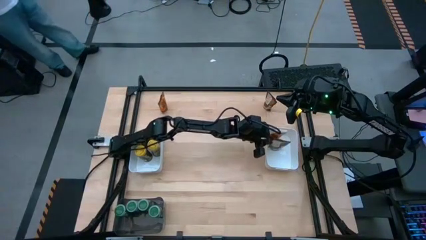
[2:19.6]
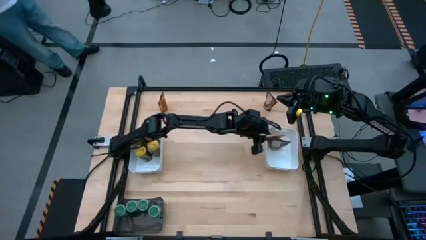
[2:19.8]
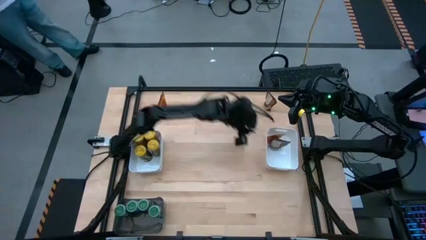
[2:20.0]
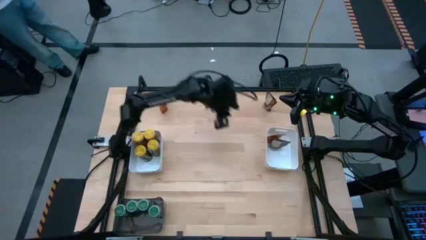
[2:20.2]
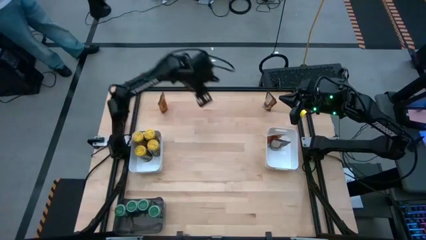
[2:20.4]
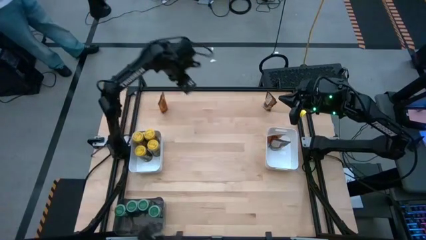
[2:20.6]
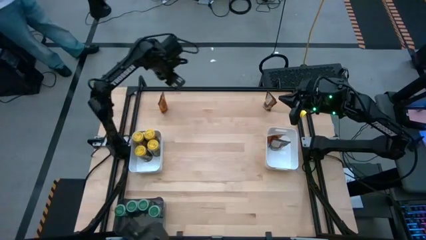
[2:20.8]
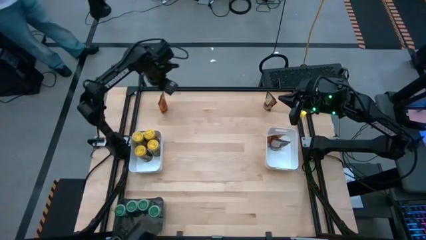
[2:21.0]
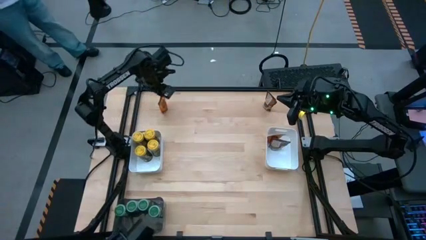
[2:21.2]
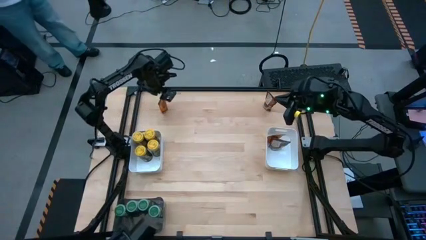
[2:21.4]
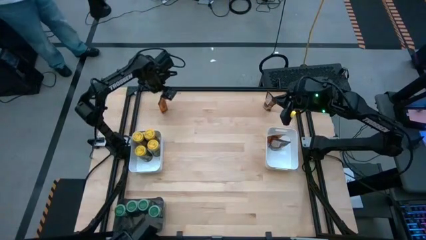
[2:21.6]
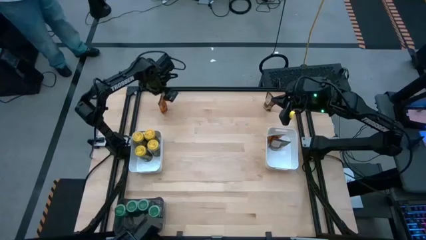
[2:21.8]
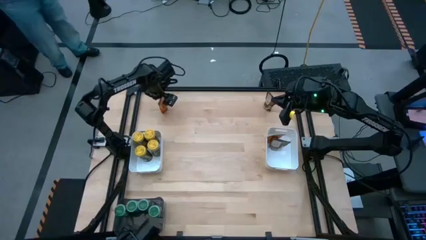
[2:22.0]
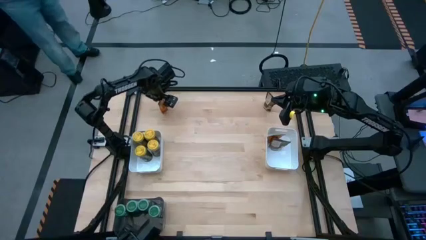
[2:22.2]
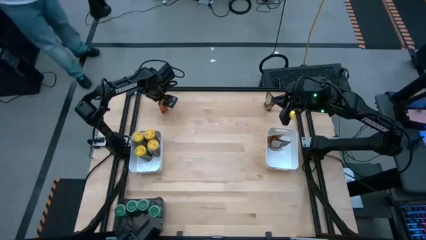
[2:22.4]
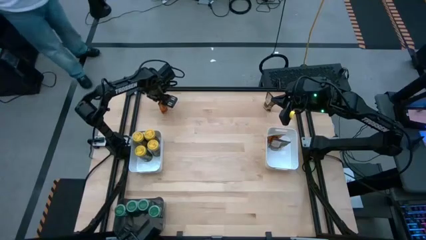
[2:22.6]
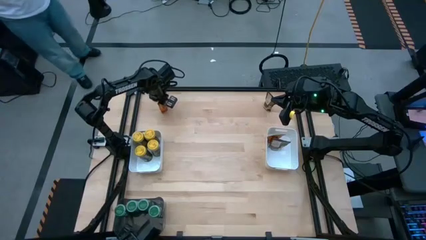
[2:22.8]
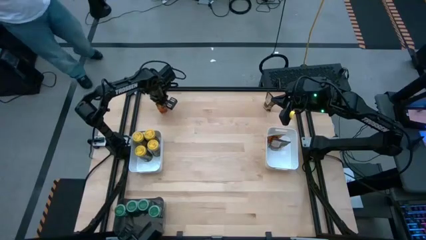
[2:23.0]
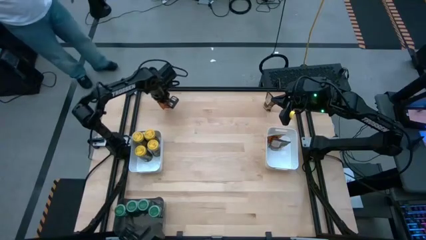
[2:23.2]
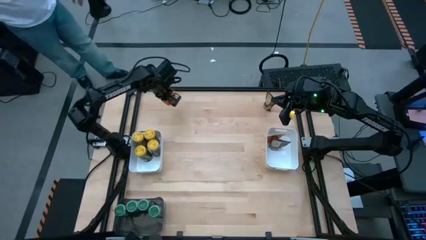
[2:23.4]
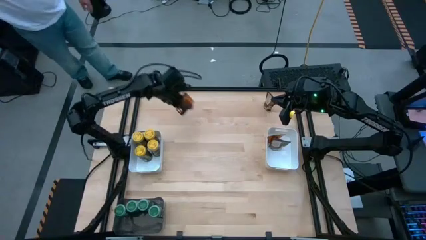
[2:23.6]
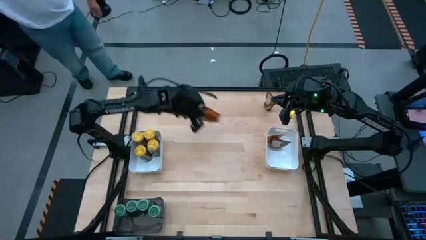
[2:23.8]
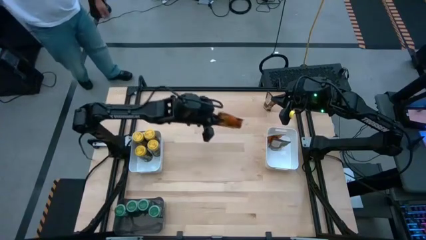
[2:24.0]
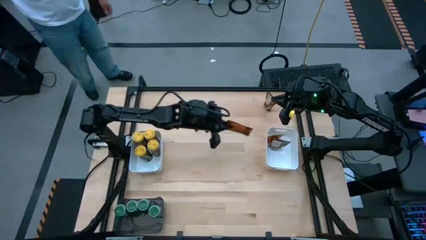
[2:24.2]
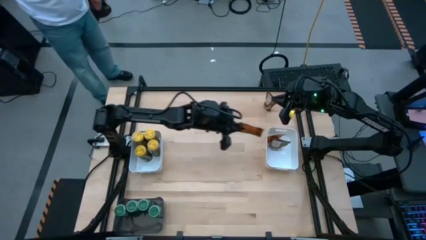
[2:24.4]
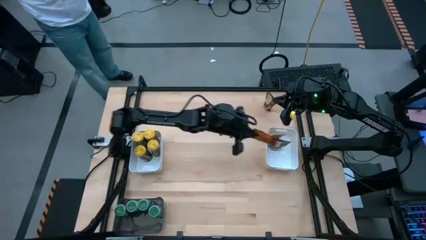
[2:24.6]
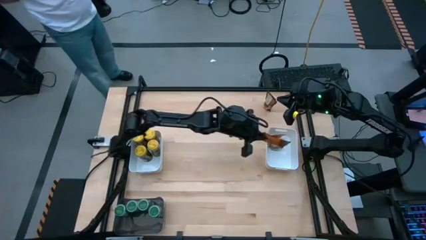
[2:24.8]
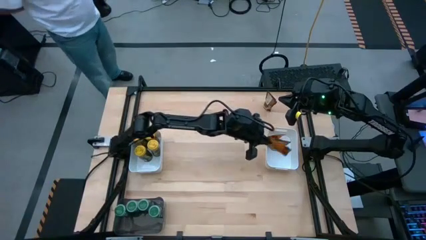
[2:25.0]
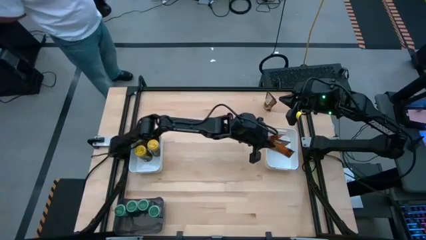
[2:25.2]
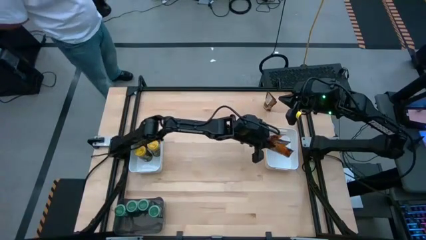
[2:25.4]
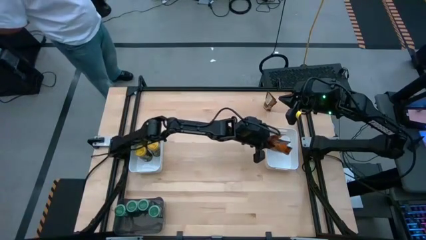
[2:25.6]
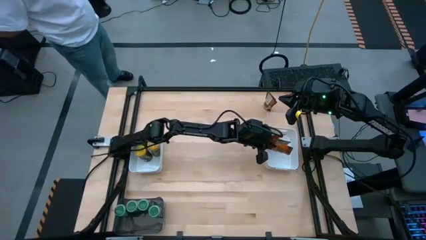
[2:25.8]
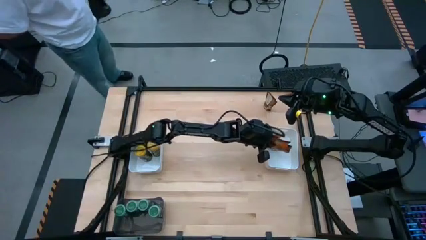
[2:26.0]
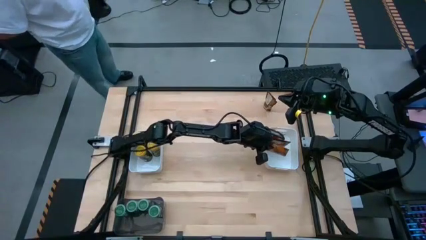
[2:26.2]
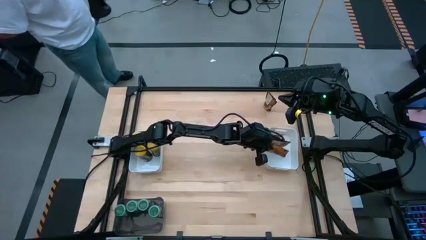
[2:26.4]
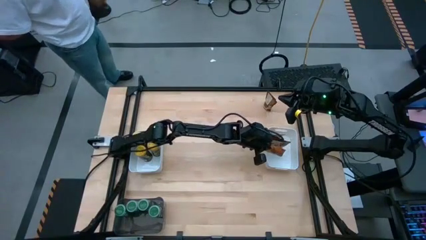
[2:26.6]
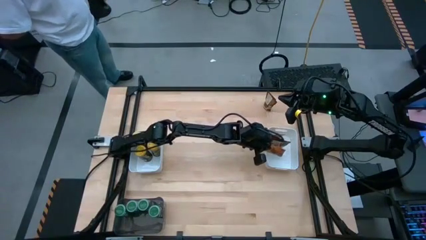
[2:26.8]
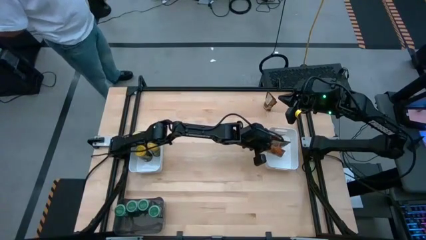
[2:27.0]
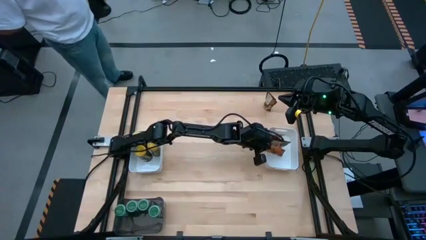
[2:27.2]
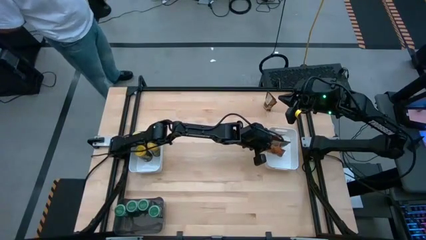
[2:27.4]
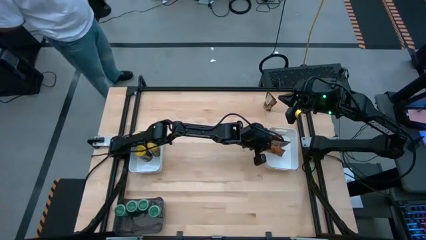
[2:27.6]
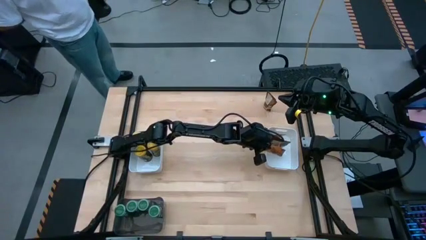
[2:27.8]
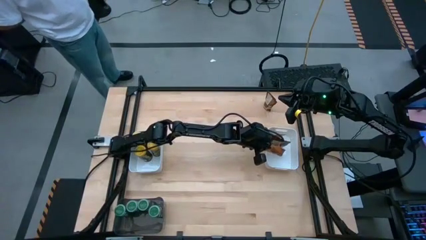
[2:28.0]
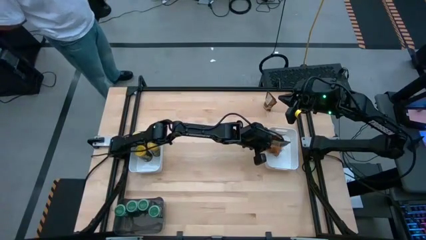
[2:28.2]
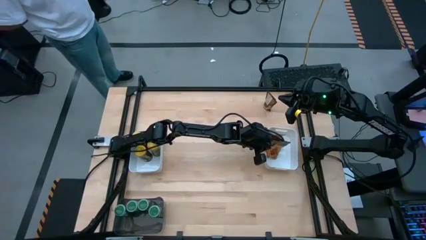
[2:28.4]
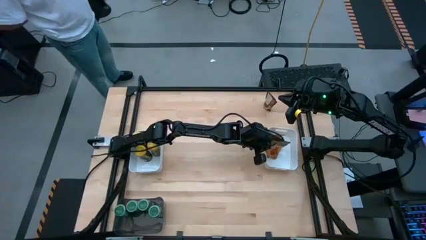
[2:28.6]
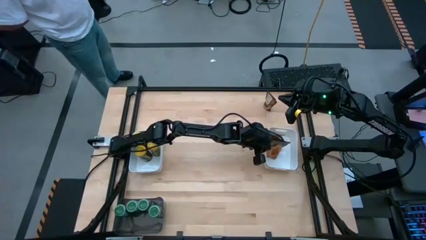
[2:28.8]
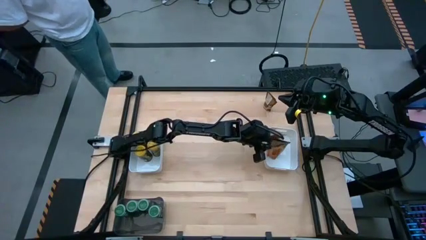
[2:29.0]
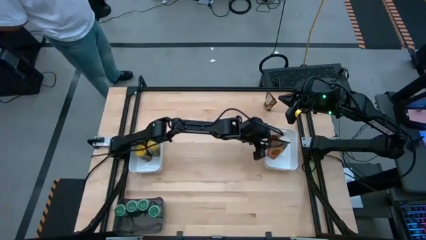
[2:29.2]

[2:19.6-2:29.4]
Task: Sort spices by type
Put the left orange seasoning bag into the right white bin

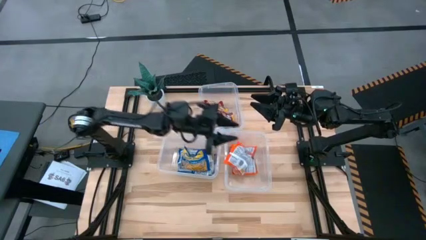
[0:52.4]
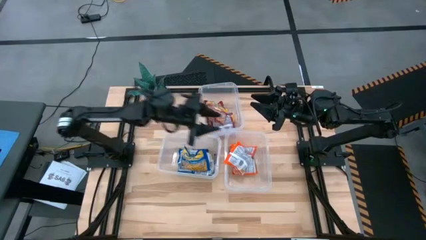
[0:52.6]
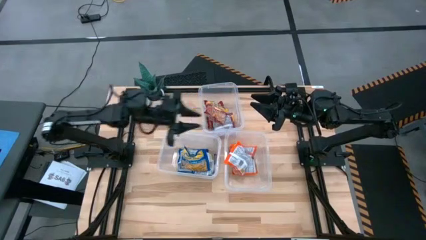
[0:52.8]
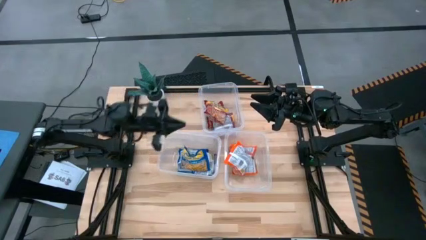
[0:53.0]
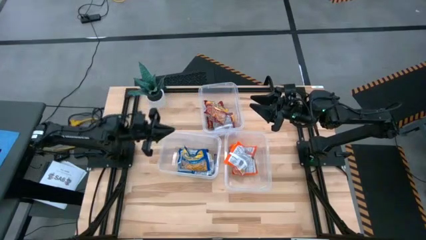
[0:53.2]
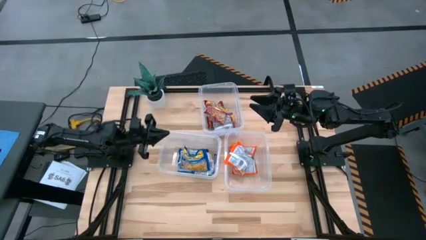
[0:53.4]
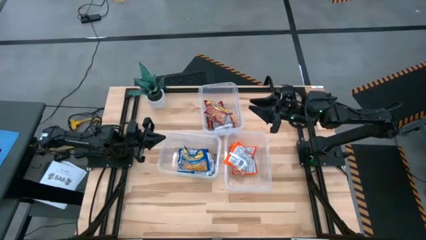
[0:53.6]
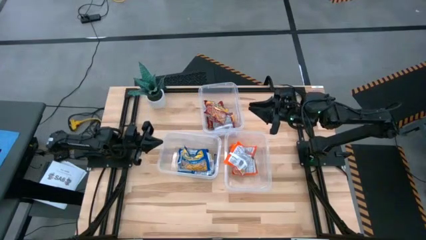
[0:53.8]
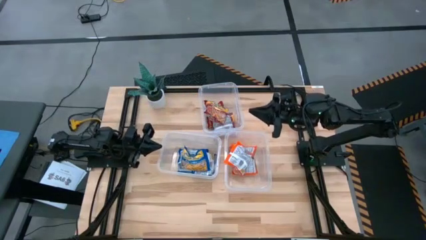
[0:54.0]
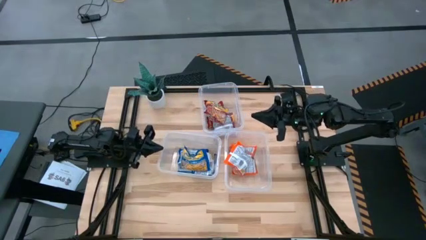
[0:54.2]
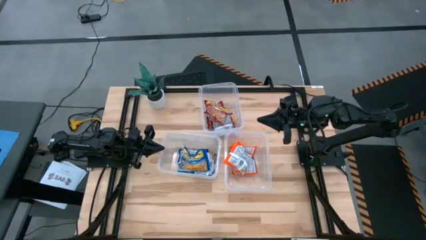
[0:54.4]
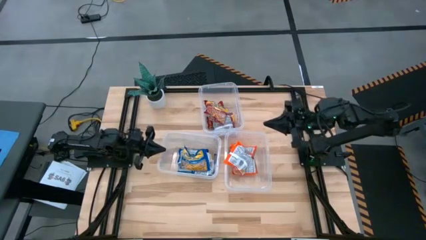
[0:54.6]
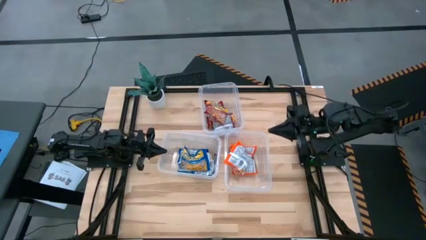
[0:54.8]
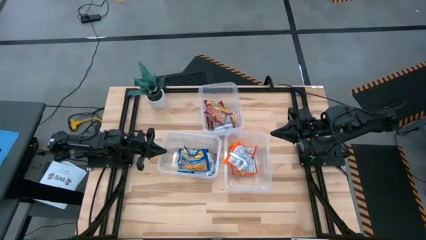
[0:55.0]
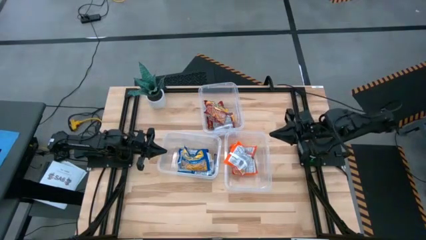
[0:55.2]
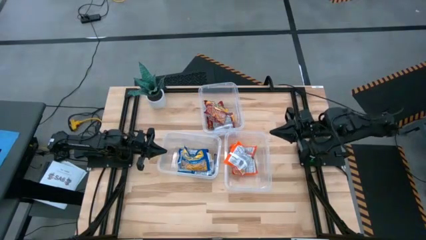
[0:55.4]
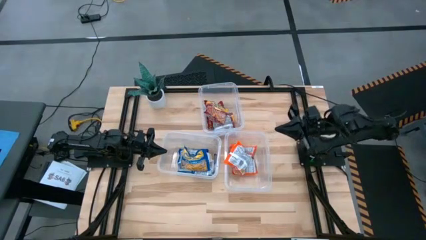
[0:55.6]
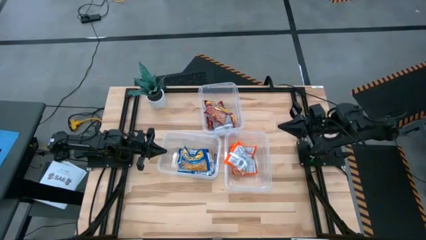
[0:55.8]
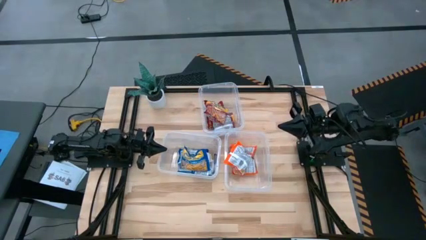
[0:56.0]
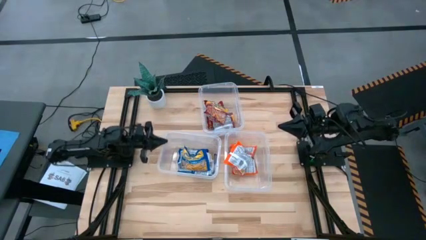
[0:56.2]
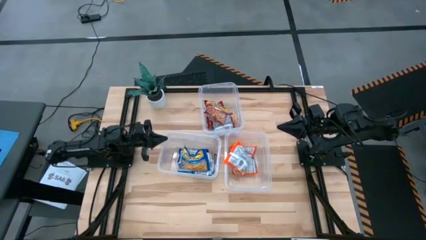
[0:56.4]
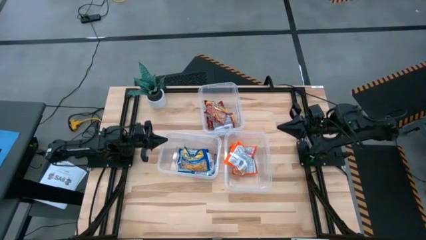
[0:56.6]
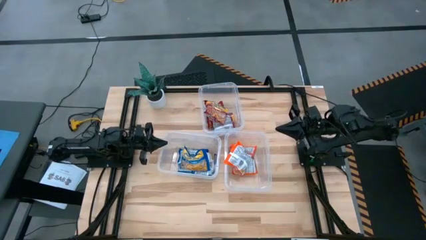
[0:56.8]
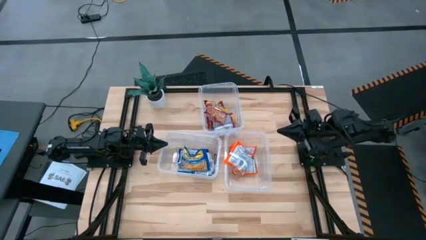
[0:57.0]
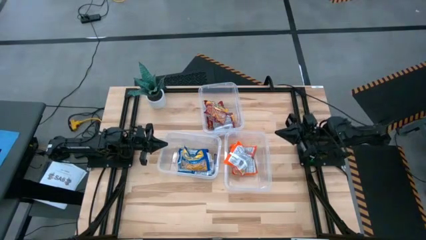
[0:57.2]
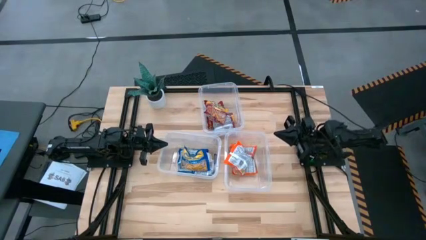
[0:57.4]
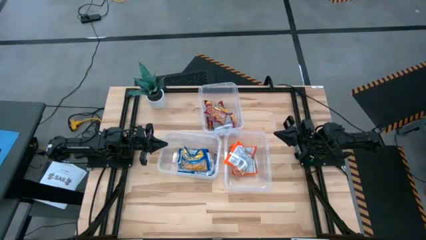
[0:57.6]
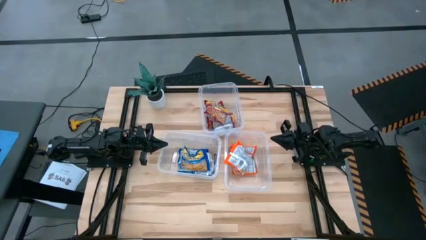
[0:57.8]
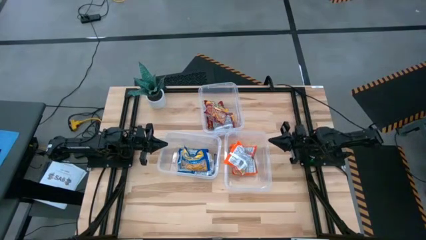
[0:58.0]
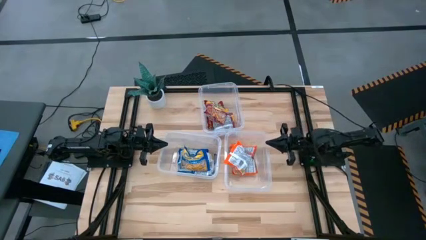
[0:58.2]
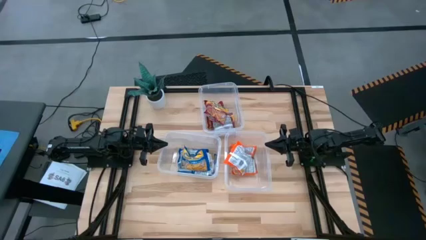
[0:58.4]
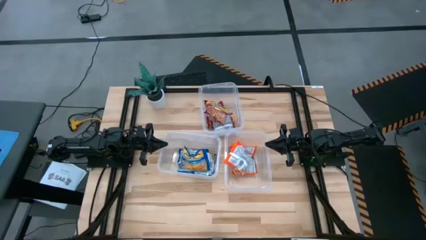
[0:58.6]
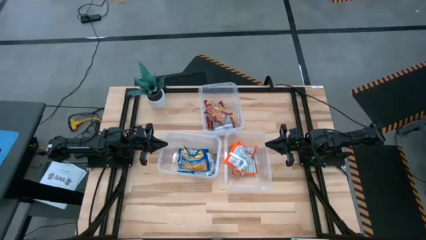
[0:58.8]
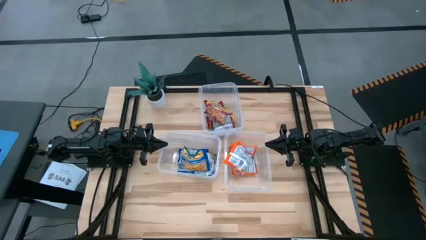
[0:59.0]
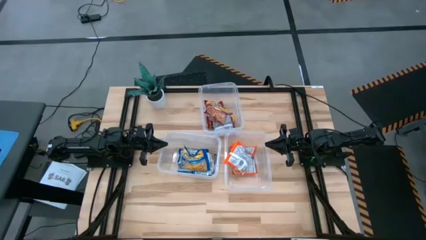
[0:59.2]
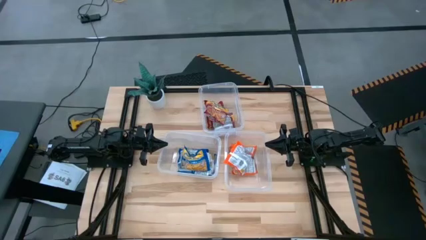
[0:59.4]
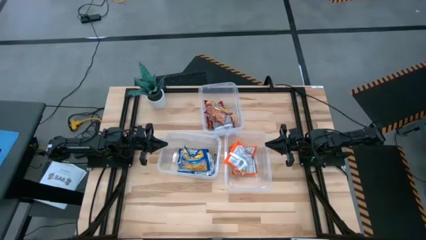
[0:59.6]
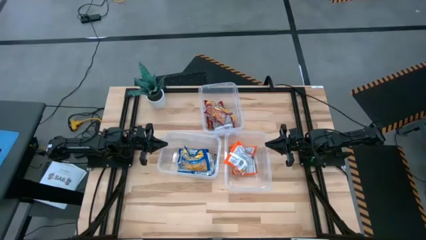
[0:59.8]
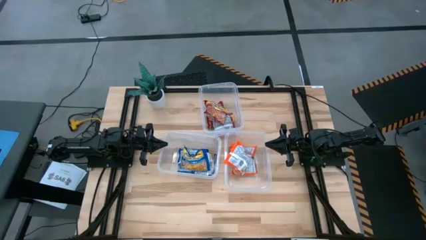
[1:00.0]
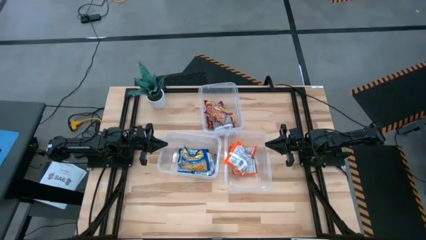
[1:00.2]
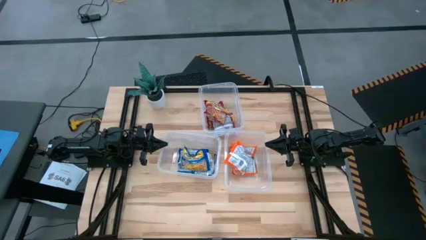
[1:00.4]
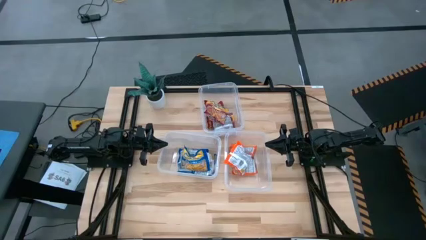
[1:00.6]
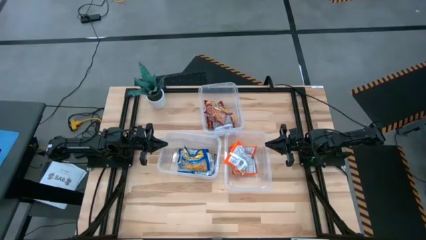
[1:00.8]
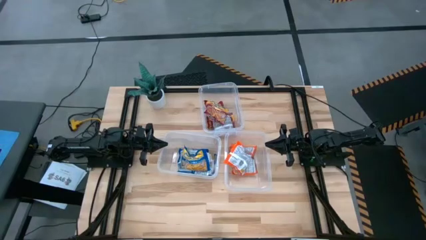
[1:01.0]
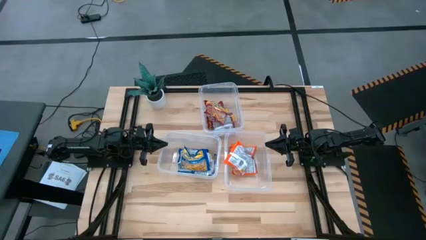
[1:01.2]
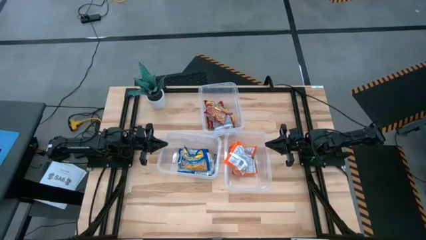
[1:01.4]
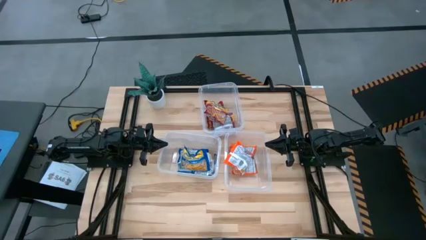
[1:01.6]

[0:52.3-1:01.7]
Task: Sort Maruchan noodles
Return to Home Position
